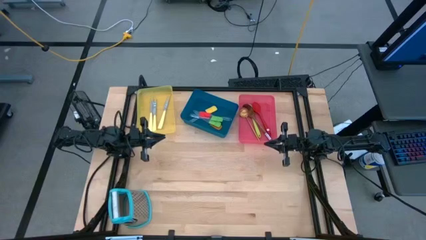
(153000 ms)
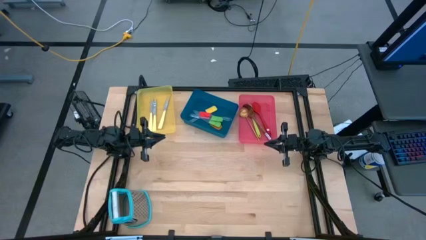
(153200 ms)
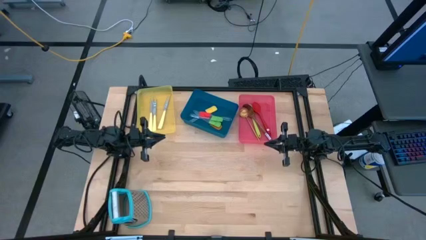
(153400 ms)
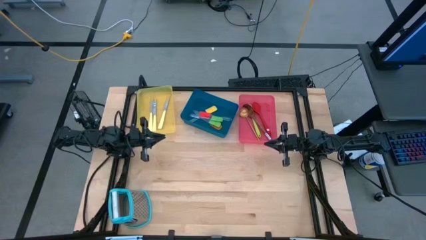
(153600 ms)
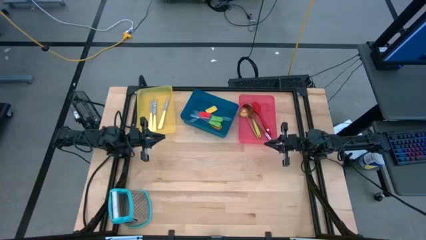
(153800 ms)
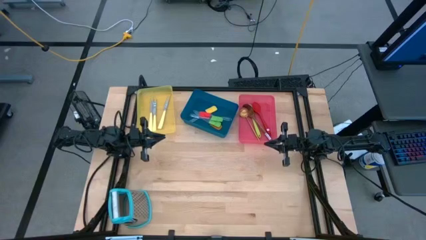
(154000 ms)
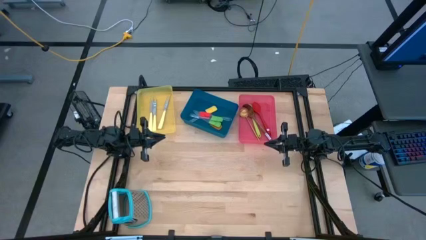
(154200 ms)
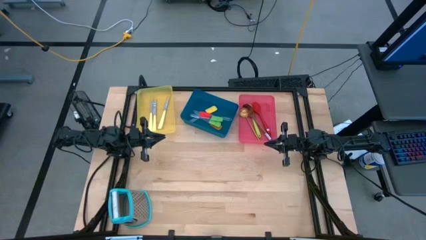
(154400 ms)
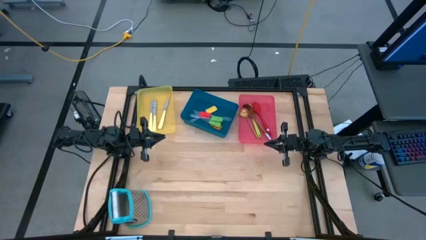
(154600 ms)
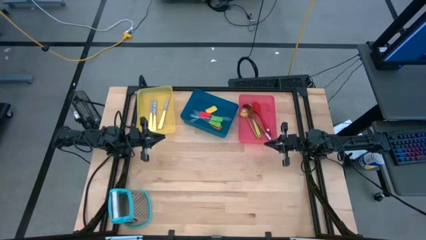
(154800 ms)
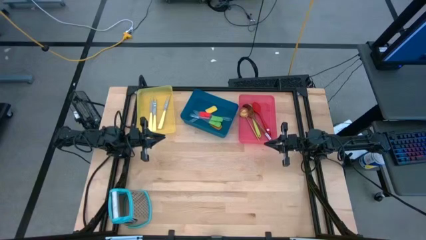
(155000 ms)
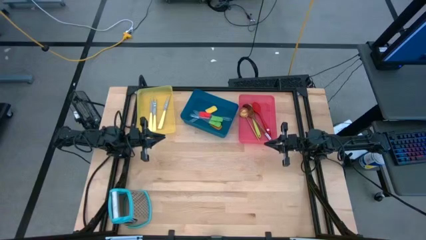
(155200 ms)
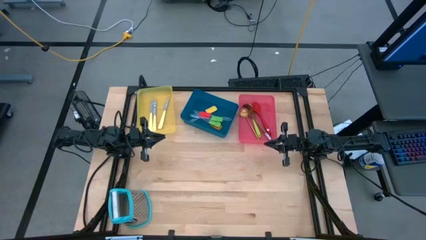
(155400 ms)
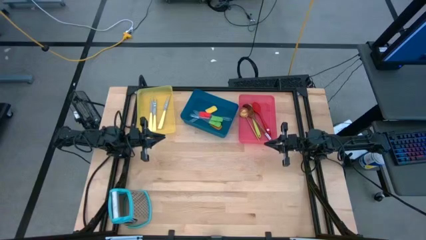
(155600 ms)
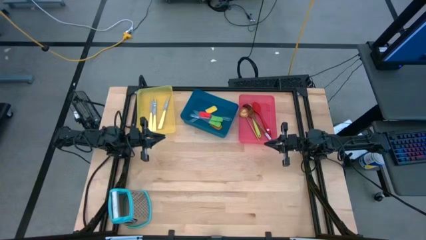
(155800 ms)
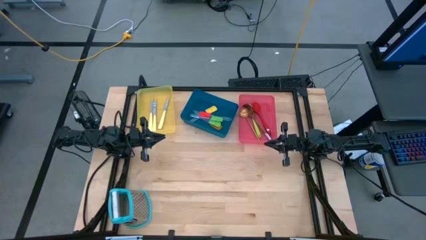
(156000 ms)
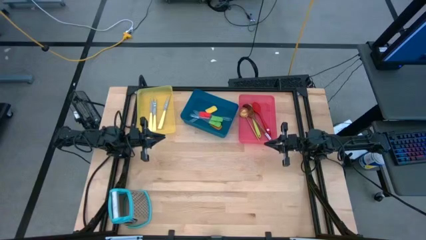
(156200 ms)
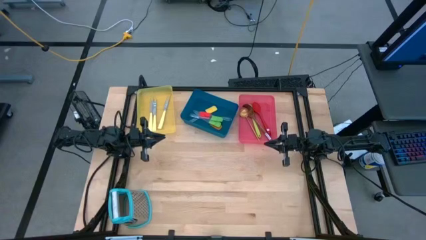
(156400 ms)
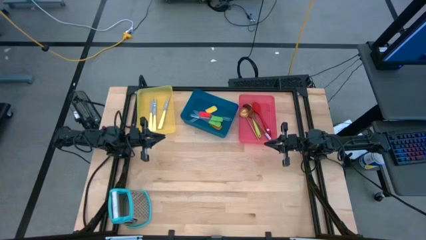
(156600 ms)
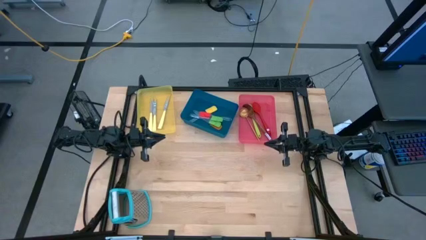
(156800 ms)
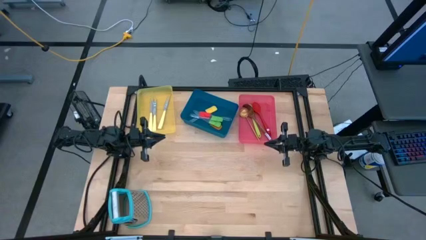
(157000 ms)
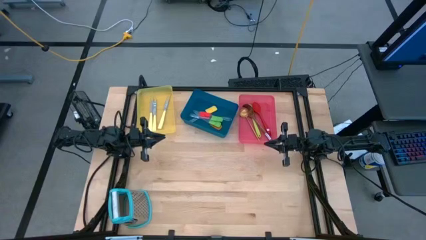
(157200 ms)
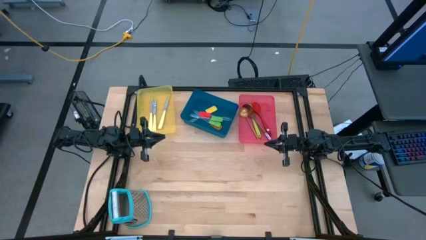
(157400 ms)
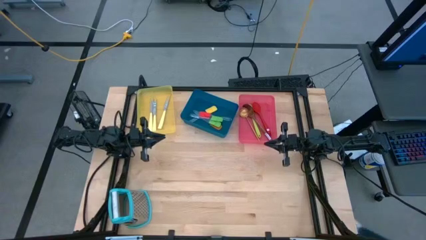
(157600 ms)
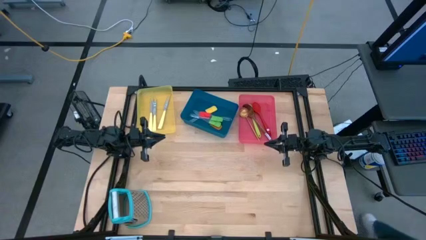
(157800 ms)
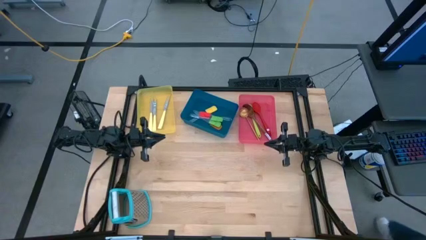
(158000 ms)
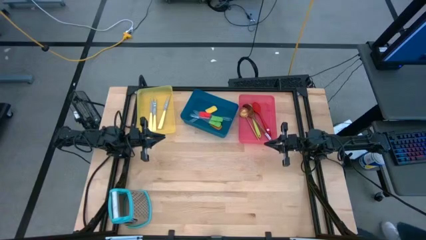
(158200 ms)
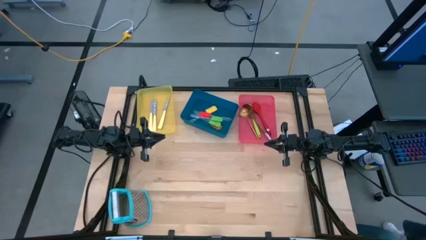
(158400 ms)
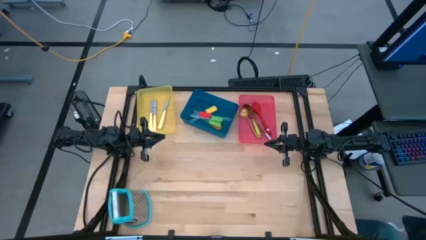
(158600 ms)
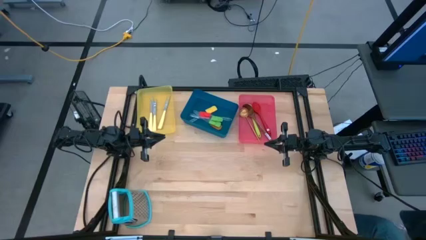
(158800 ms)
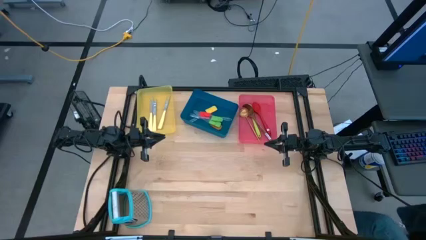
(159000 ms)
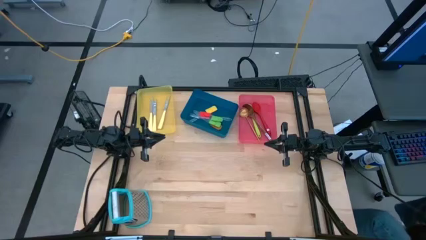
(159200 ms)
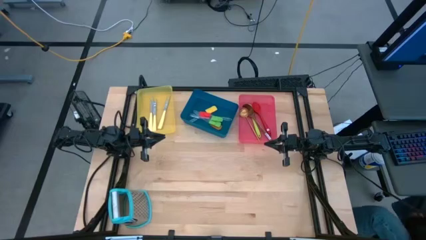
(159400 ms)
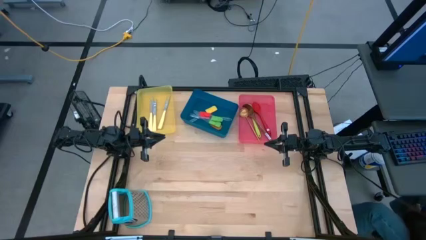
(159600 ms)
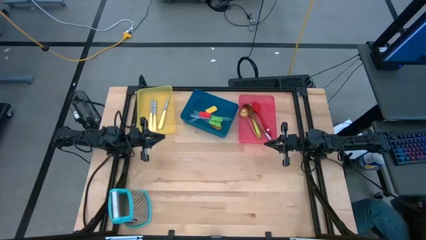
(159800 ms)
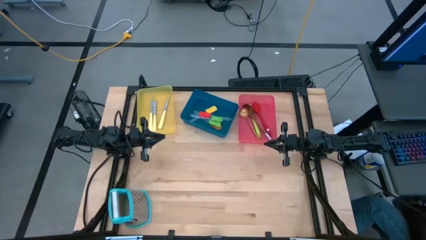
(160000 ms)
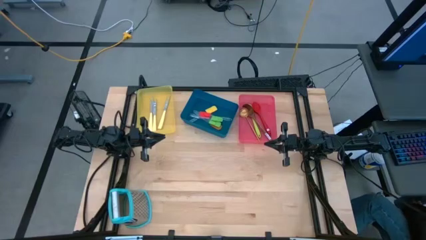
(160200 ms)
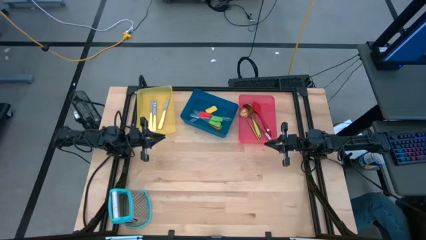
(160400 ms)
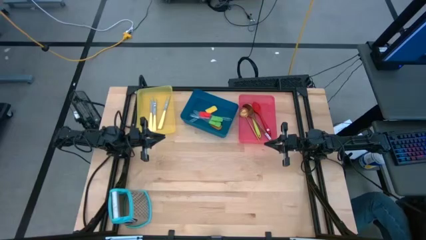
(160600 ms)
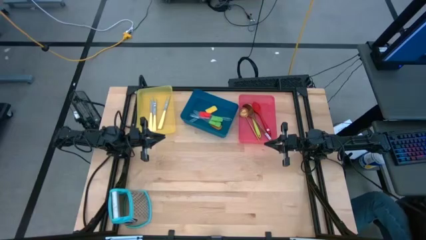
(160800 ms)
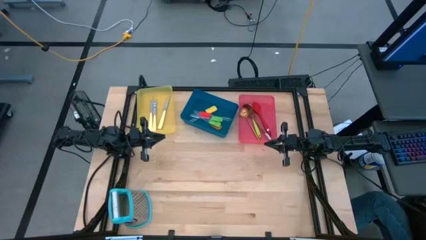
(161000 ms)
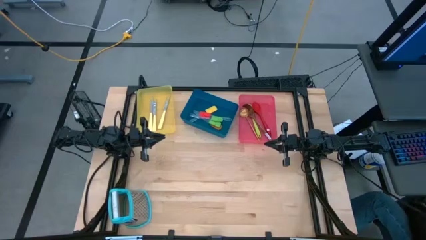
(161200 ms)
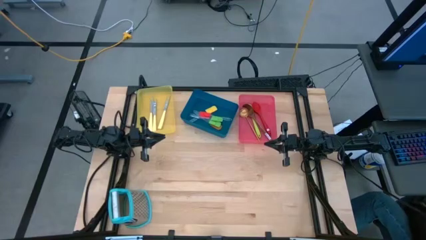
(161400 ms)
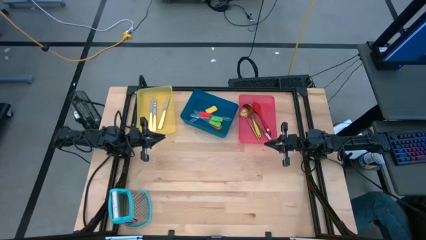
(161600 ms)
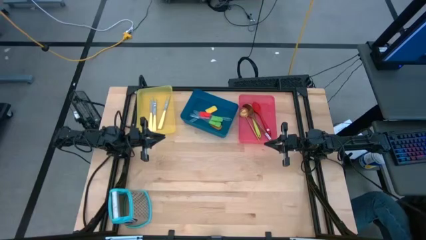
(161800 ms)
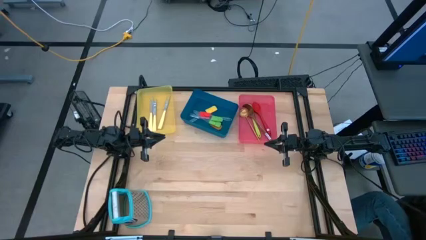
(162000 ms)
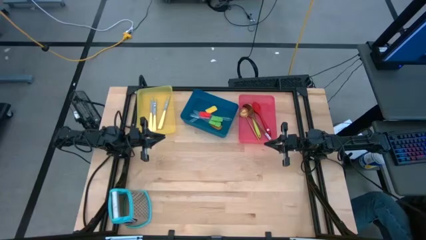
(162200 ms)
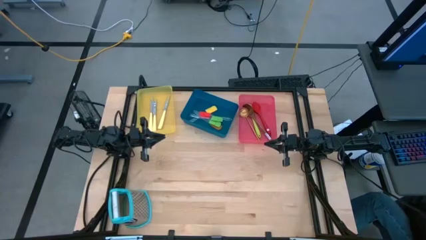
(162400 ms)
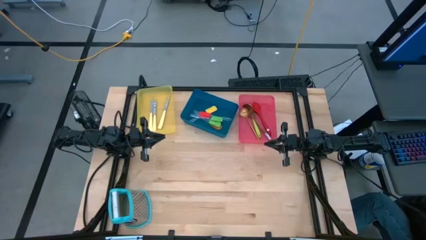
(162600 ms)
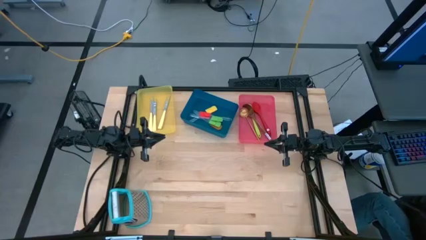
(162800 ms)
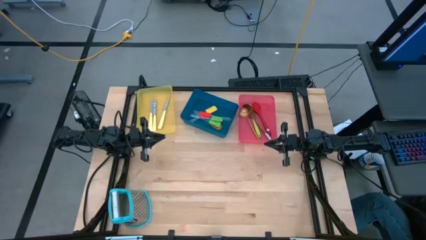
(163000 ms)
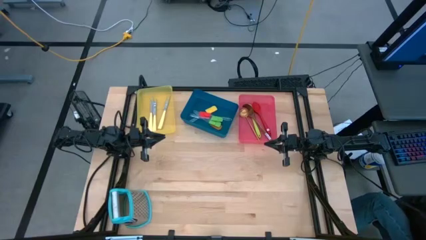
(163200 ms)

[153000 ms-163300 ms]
Task: Pick & Place Kitchen Items
Return to Home Position

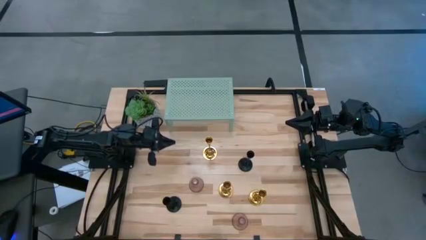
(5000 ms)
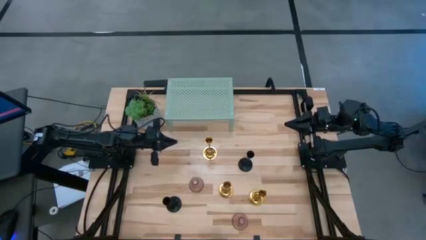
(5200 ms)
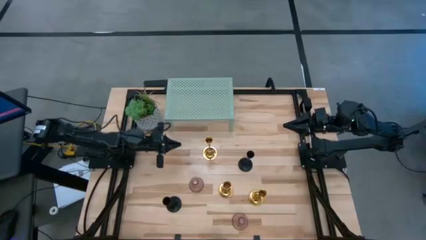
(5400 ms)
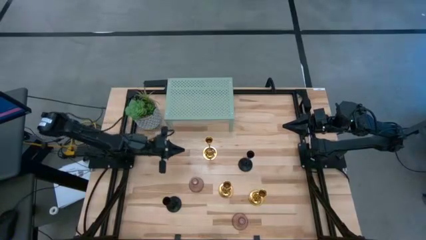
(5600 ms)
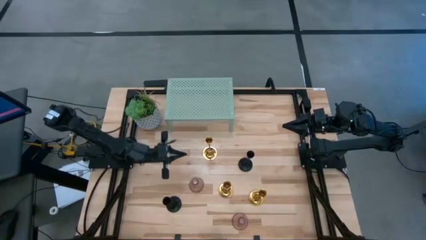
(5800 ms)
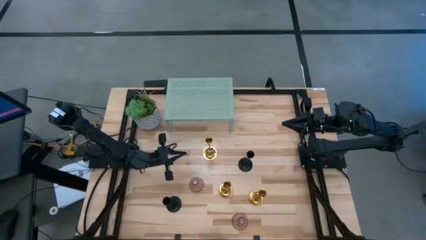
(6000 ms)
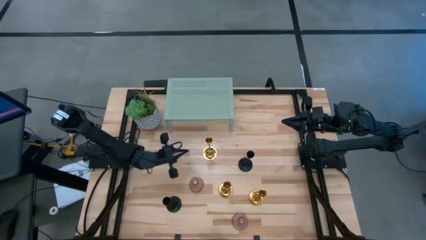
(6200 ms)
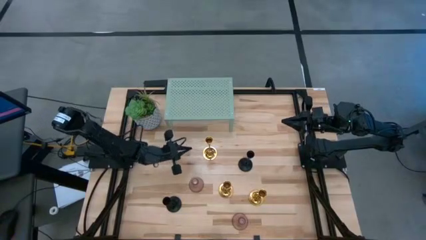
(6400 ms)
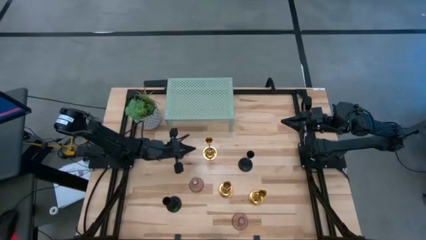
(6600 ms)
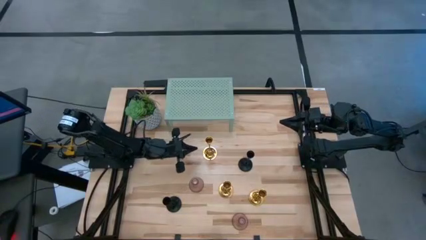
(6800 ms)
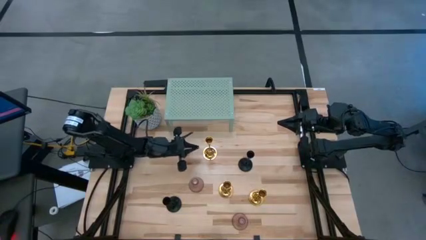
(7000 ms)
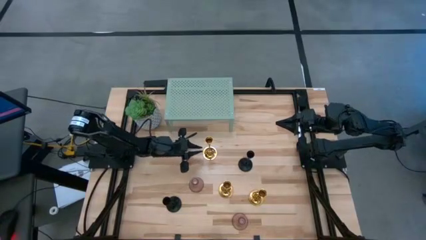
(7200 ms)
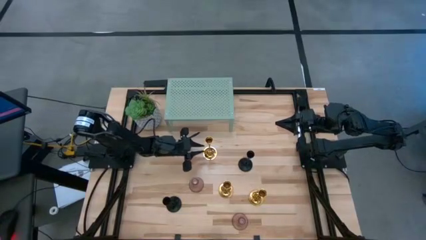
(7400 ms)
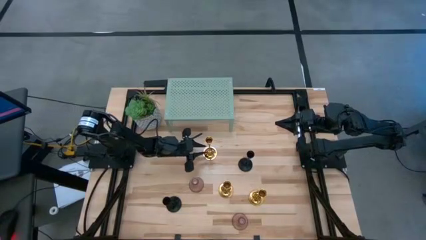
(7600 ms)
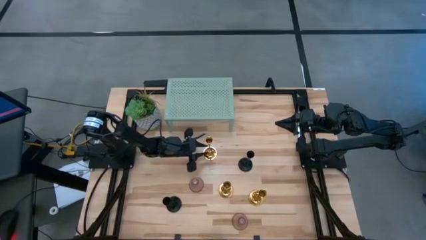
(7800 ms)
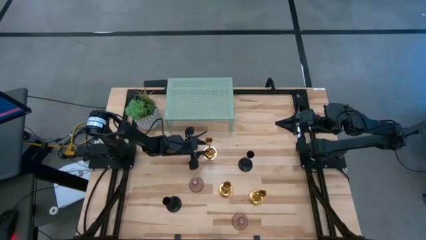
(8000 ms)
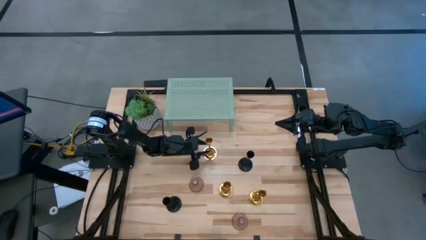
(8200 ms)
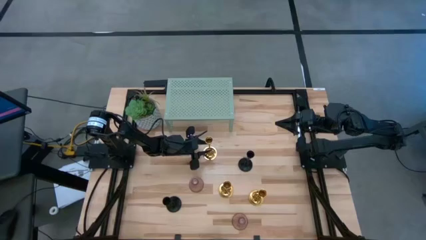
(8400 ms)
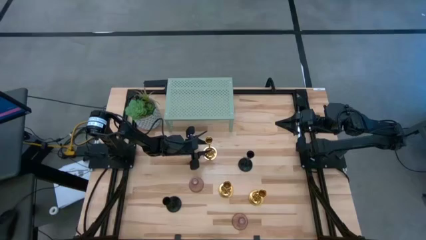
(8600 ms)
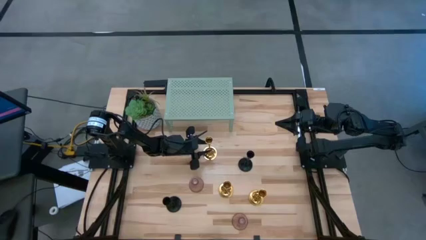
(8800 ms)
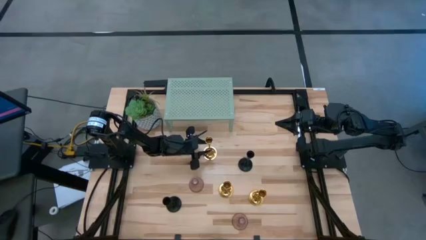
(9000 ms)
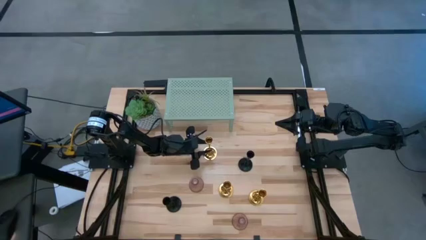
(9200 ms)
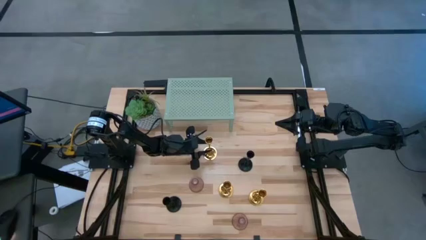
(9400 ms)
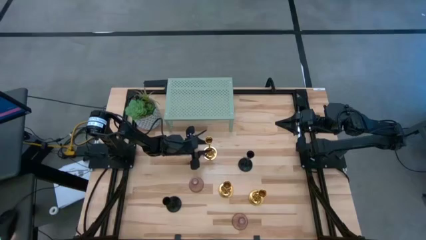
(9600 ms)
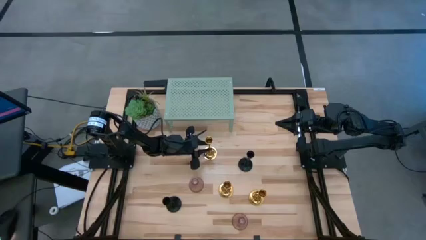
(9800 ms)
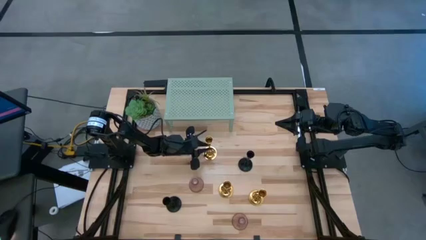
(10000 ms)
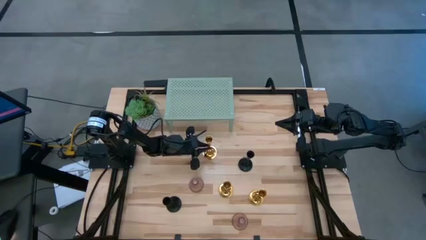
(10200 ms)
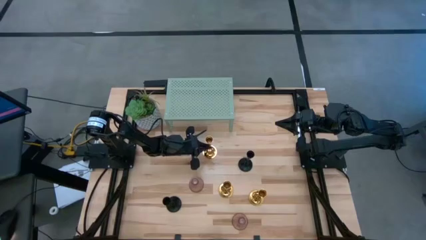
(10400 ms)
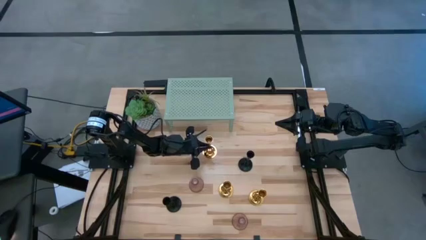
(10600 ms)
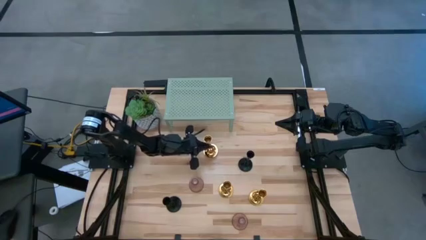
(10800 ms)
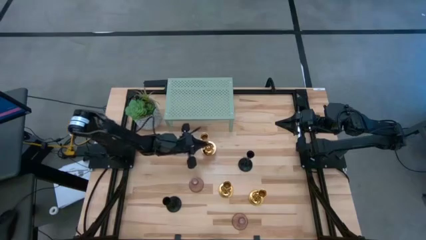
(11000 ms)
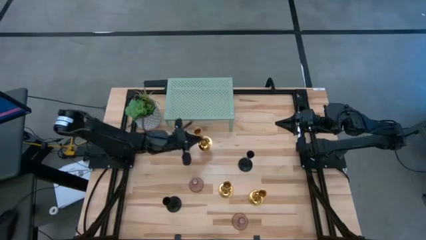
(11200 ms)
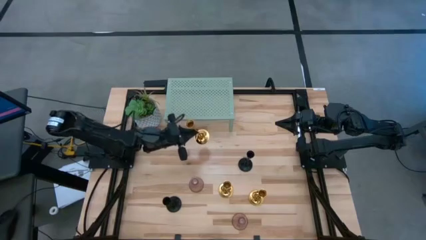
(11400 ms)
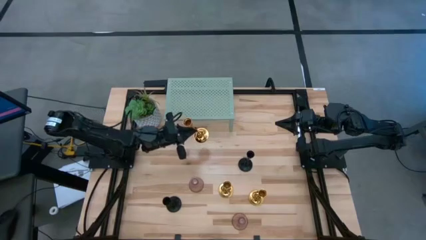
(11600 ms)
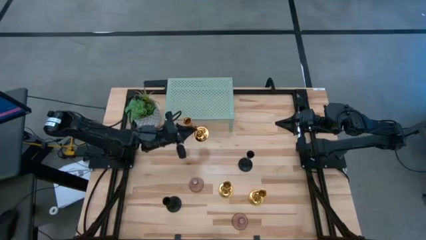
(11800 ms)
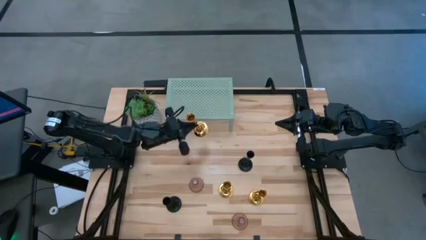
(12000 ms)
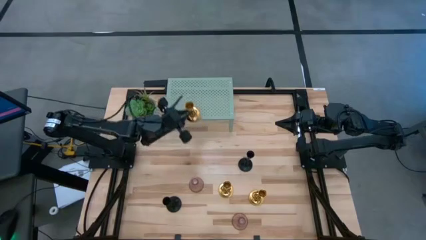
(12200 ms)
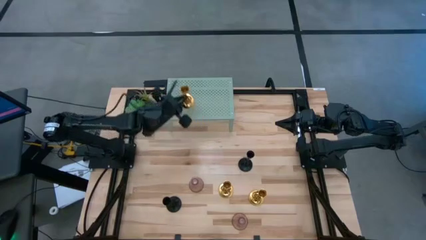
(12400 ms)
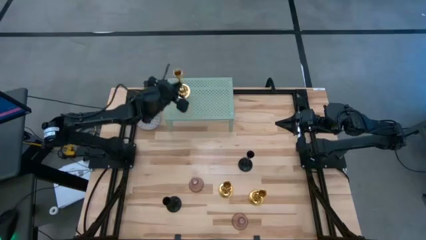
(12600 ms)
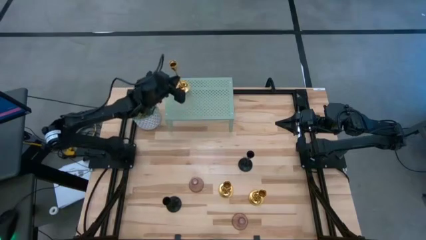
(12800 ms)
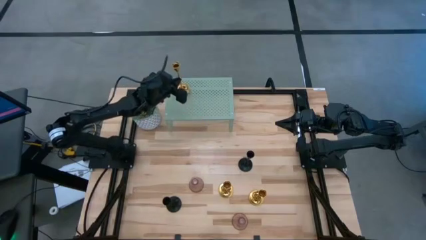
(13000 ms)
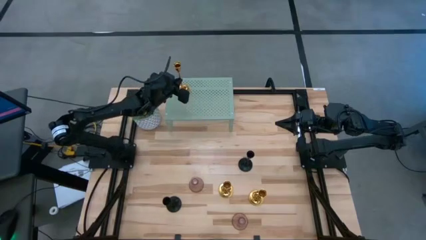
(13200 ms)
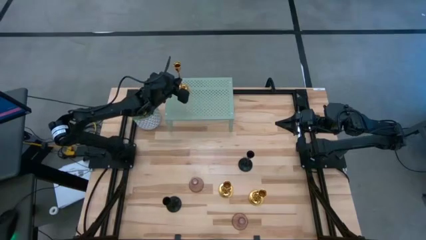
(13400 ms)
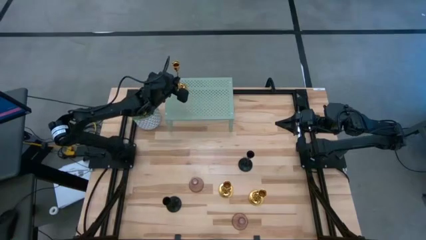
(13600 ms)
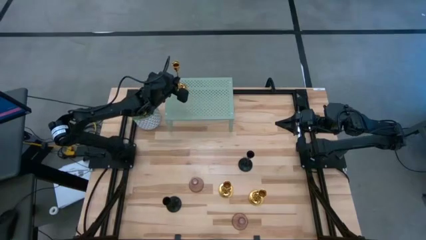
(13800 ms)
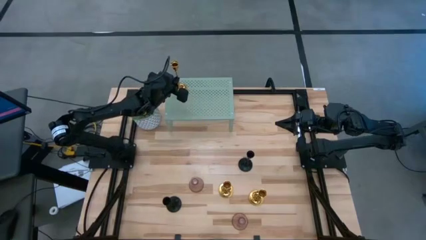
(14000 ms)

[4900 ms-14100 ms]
Task: Pick & Place candle stick holders
Put the top golden candle holder on the shelf
